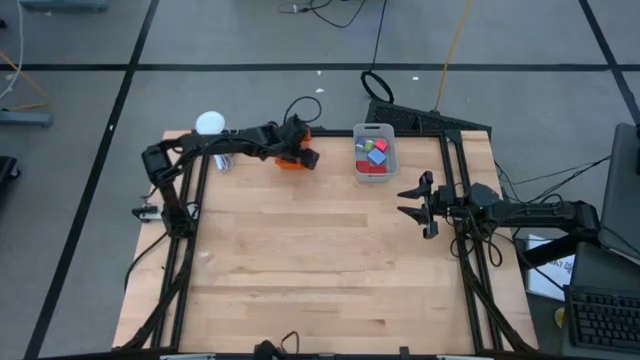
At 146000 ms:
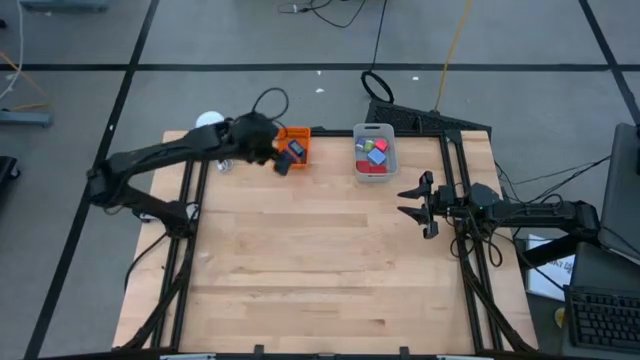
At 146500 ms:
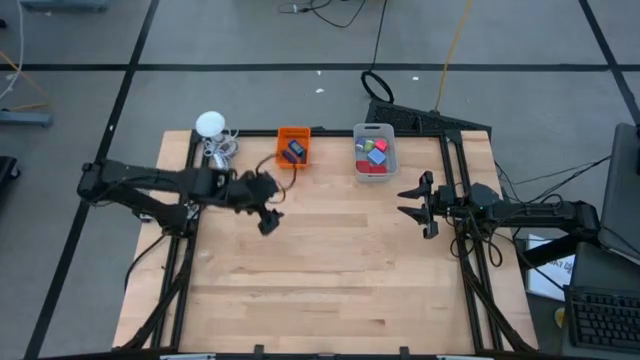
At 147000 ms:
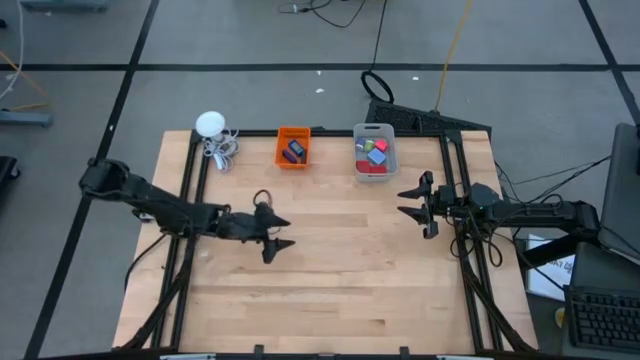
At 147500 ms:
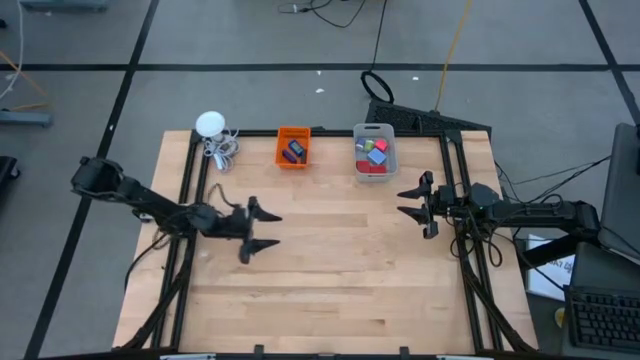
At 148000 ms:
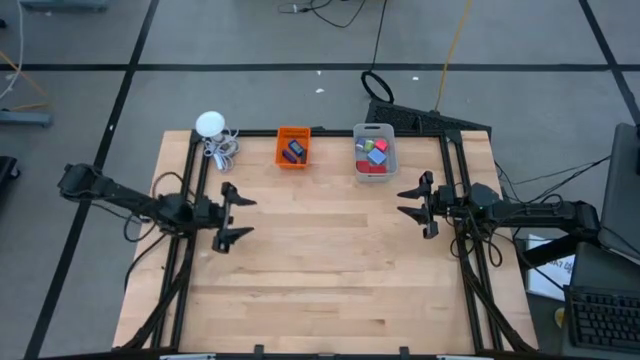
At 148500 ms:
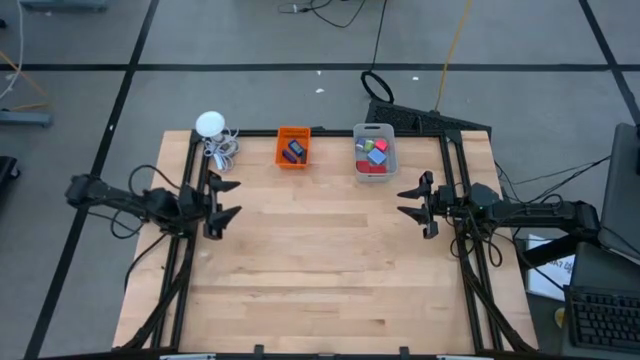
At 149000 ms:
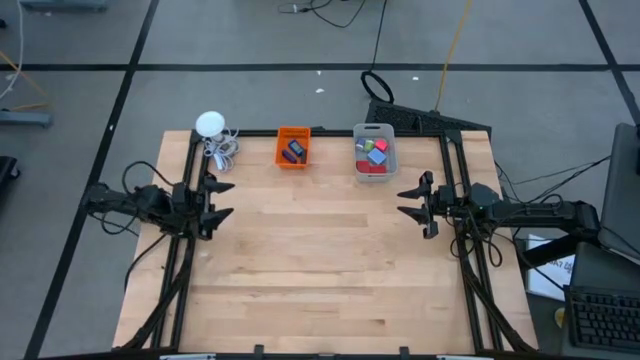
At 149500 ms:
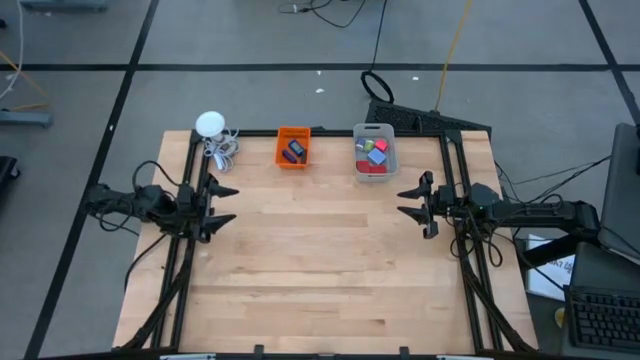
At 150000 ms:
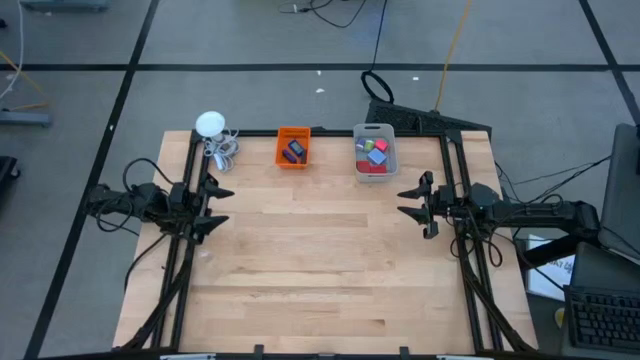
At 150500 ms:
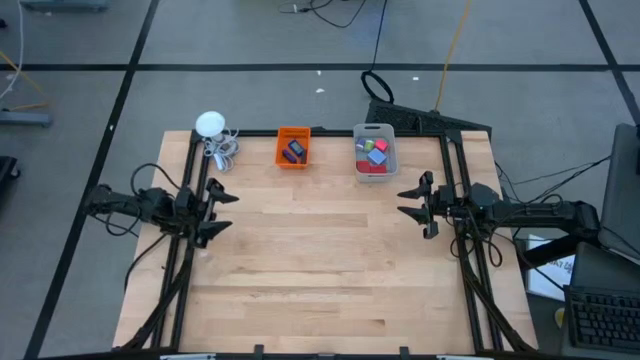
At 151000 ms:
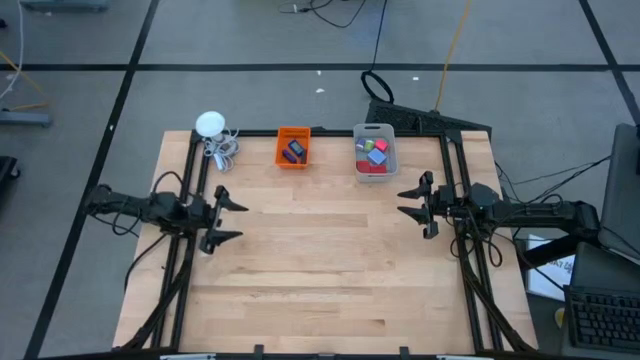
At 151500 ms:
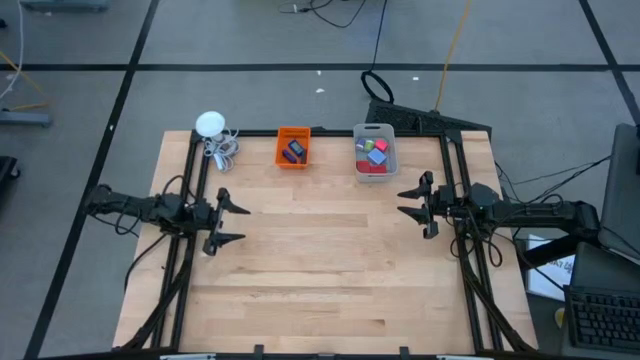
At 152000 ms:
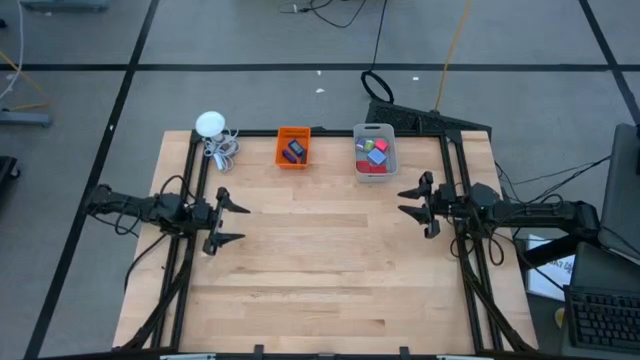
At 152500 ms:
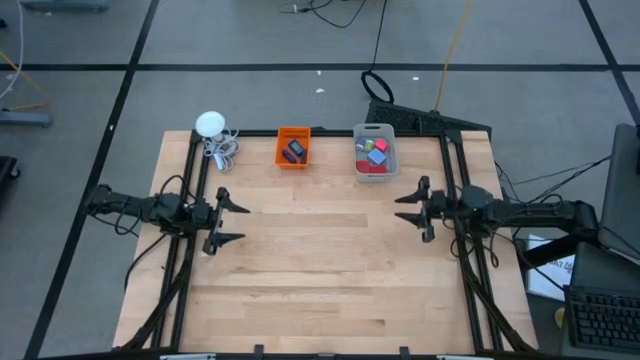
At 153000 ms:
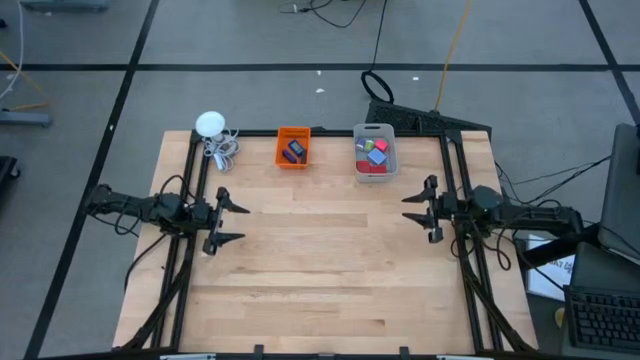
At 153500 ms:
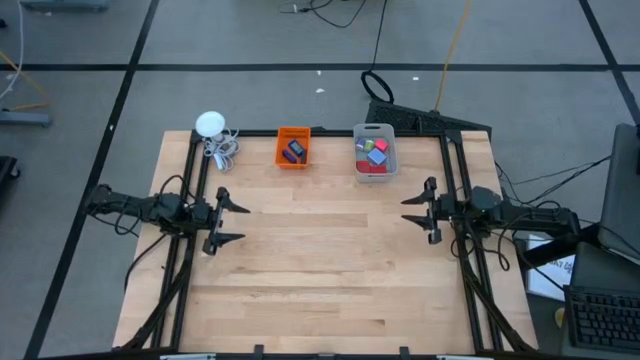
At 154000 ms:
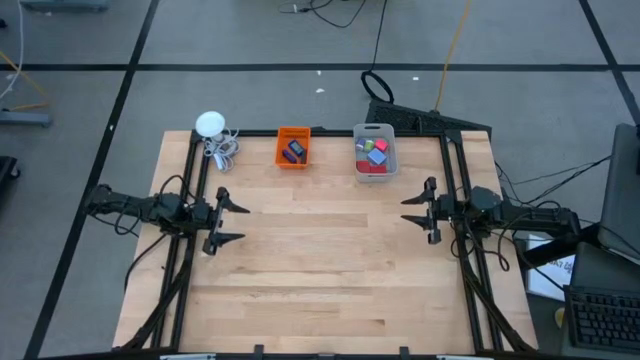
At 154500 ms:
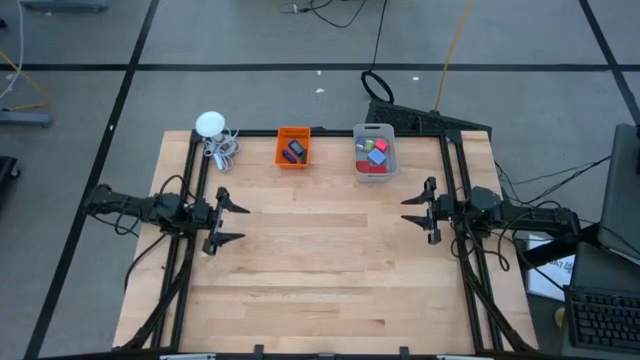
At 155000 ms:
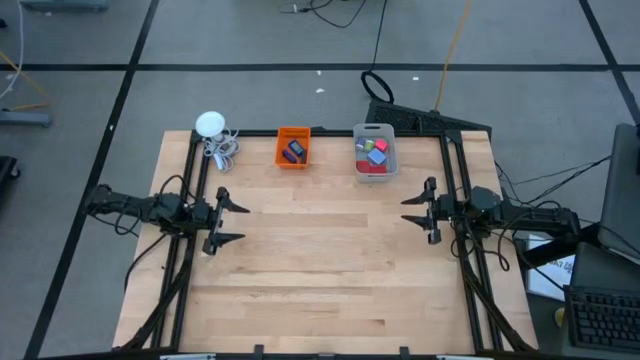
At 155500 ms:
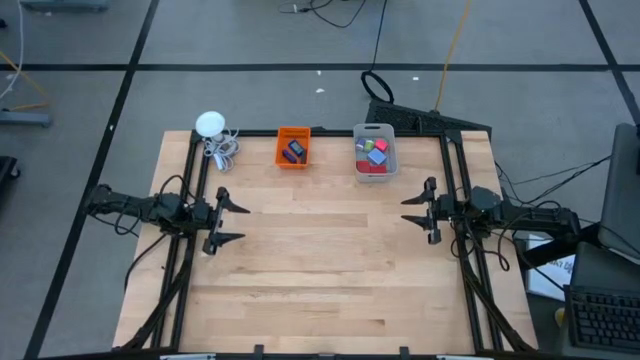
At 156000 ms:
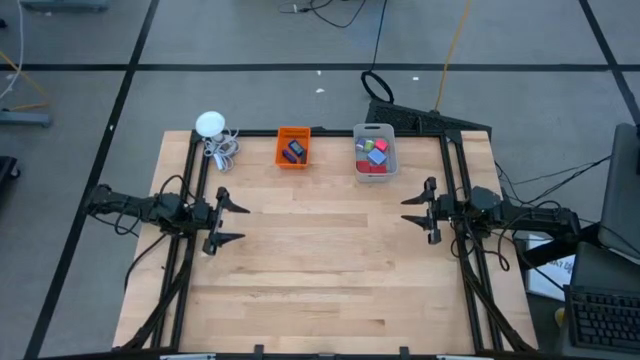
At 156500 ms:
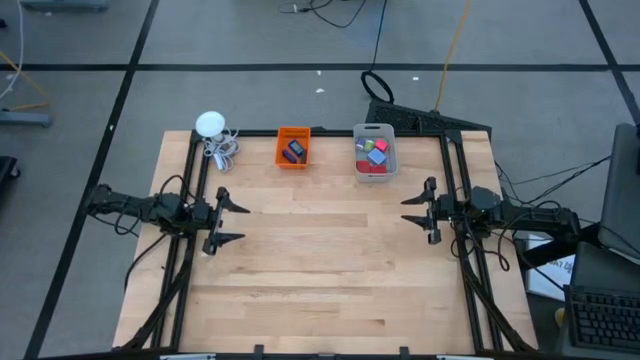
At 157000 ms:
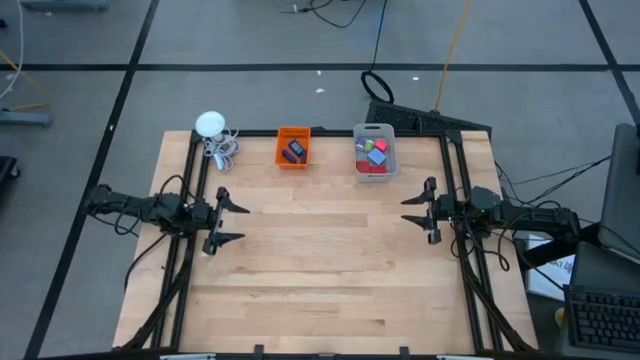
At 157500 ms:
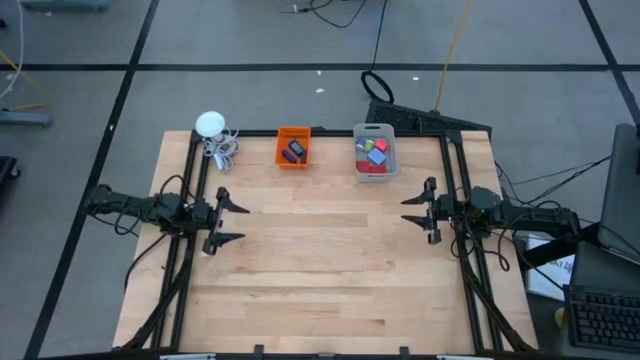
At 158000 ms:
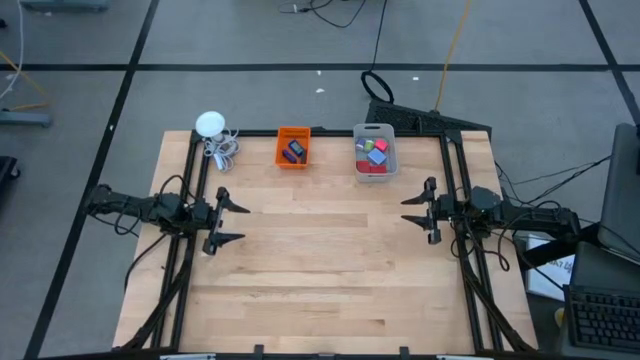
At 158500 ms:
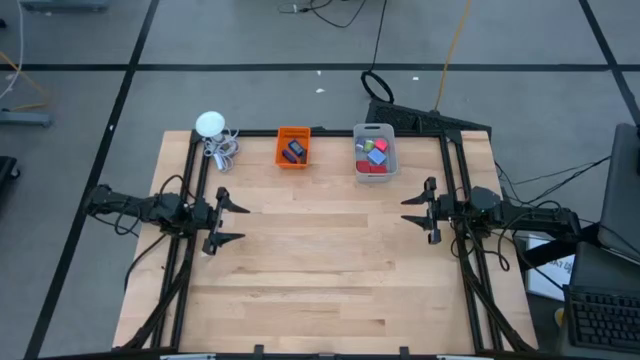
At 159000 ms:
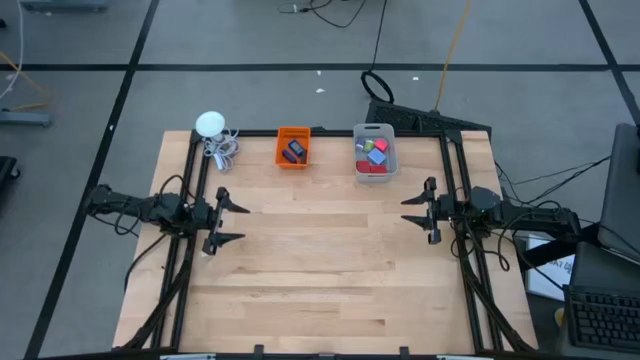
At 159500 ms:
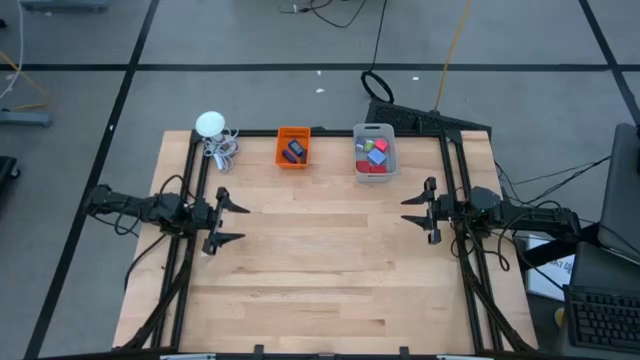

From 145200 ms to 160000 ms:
Task: Pick & Place Office items
Return to Home Position

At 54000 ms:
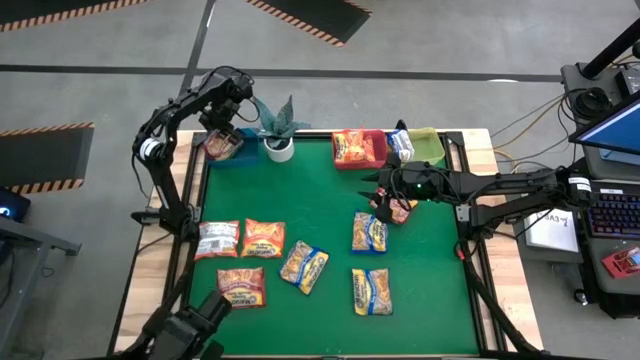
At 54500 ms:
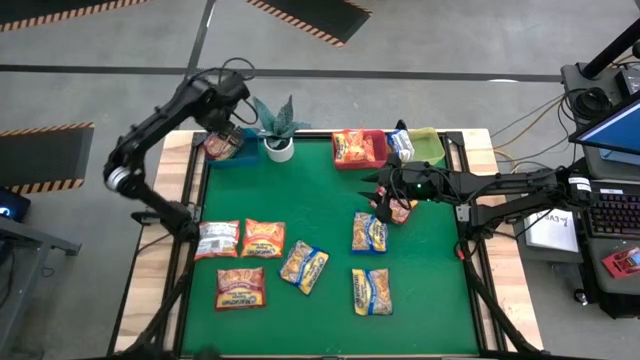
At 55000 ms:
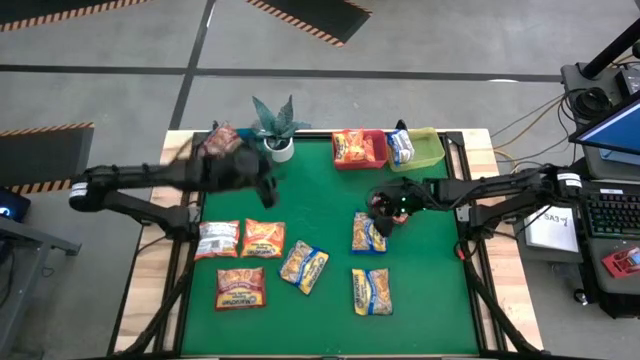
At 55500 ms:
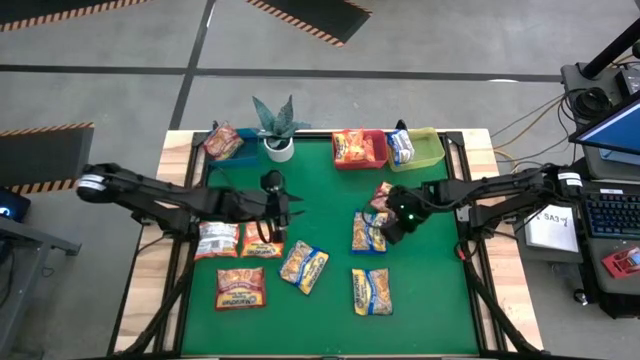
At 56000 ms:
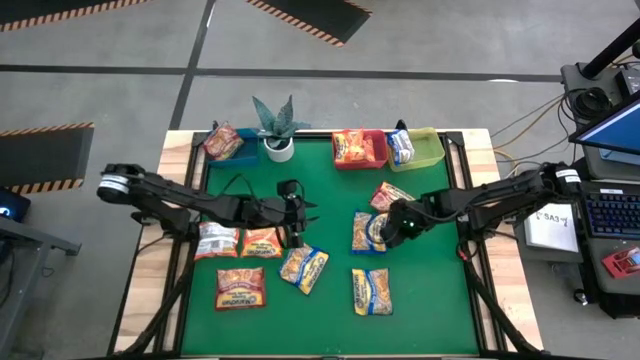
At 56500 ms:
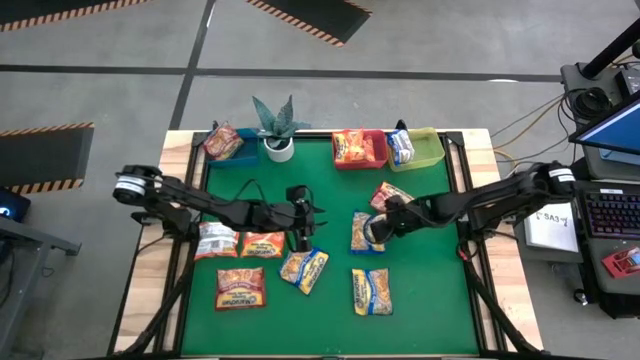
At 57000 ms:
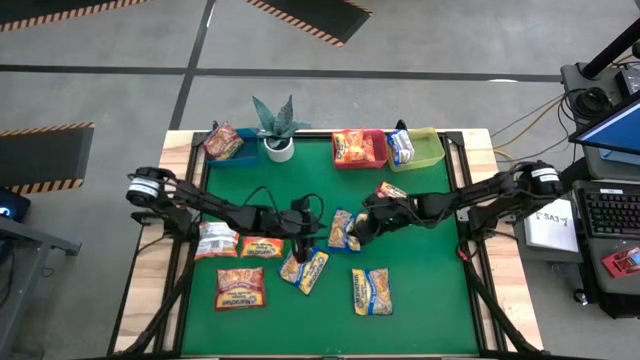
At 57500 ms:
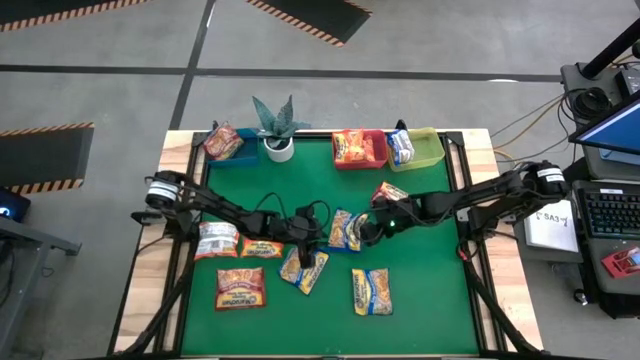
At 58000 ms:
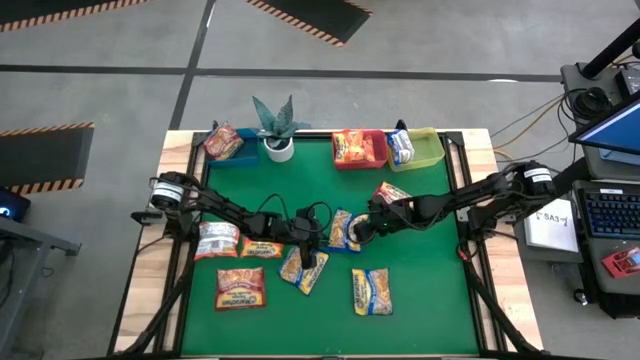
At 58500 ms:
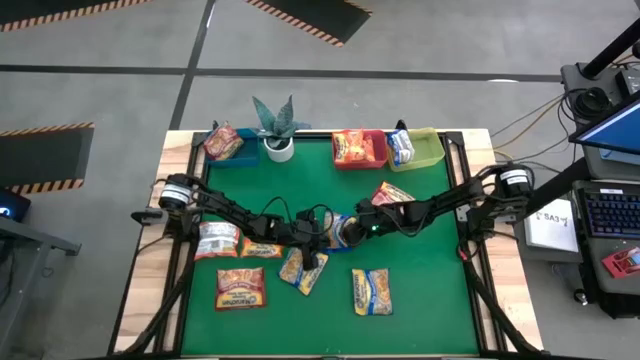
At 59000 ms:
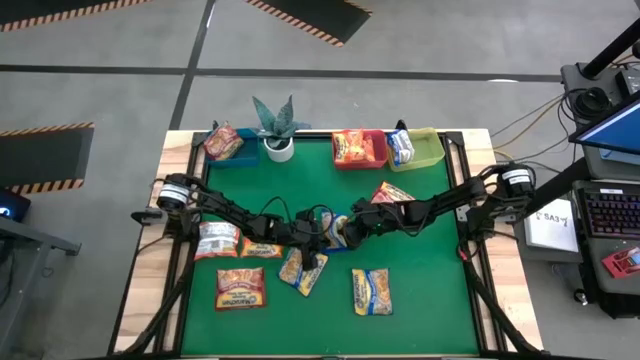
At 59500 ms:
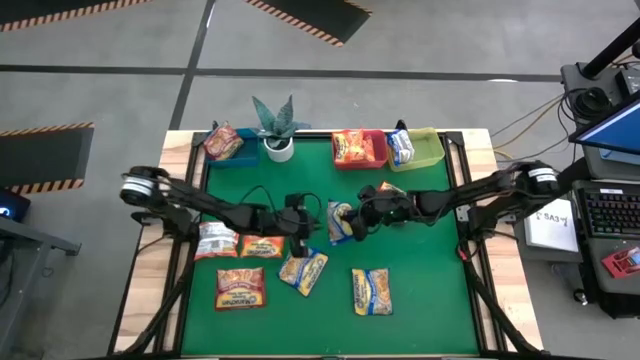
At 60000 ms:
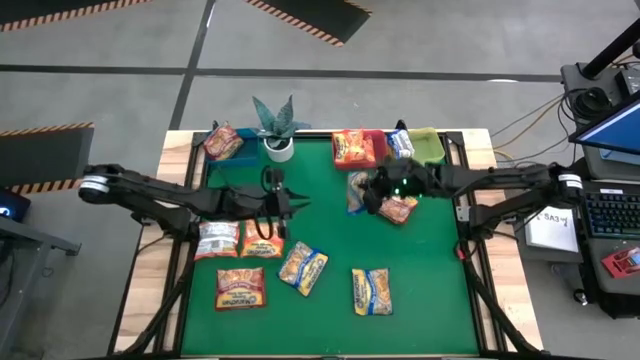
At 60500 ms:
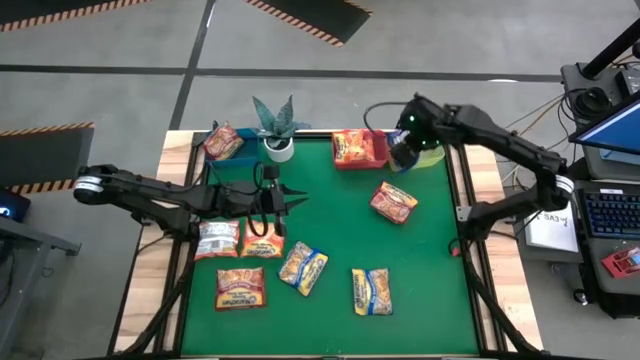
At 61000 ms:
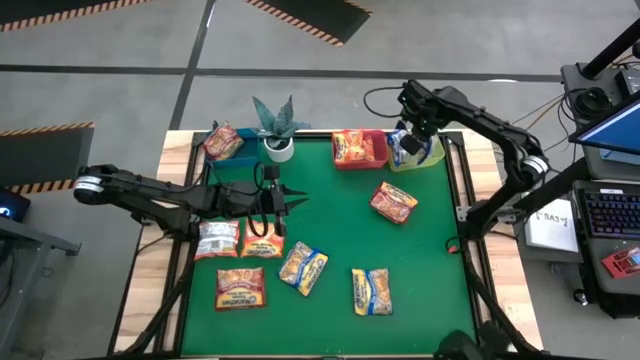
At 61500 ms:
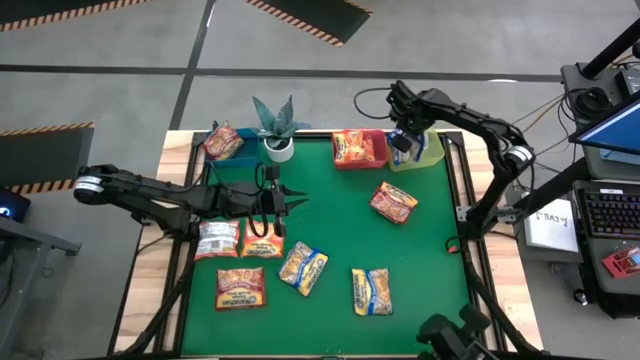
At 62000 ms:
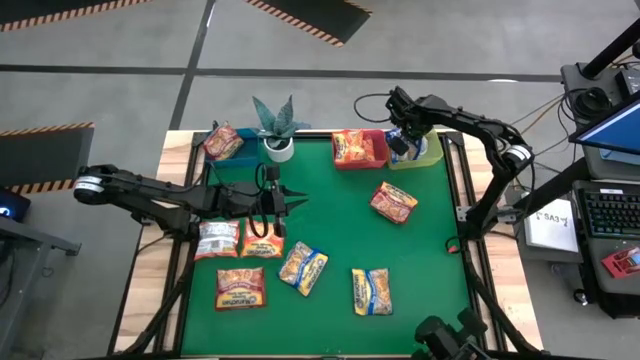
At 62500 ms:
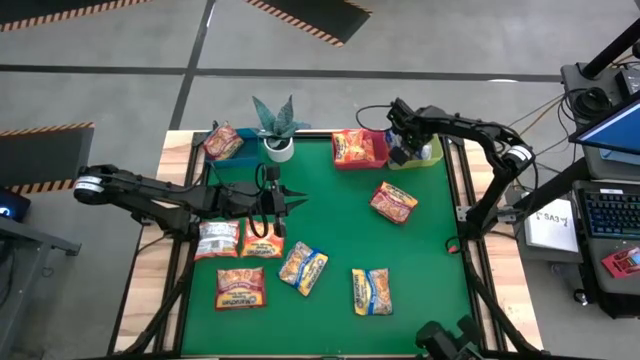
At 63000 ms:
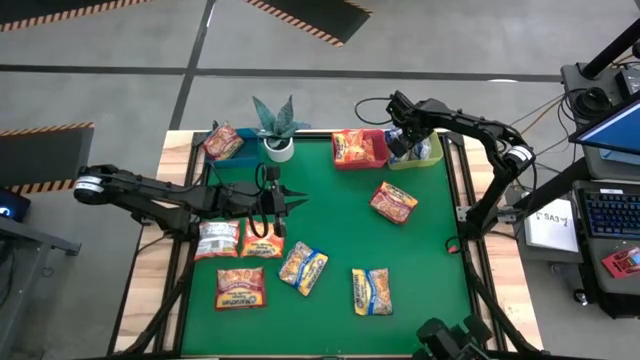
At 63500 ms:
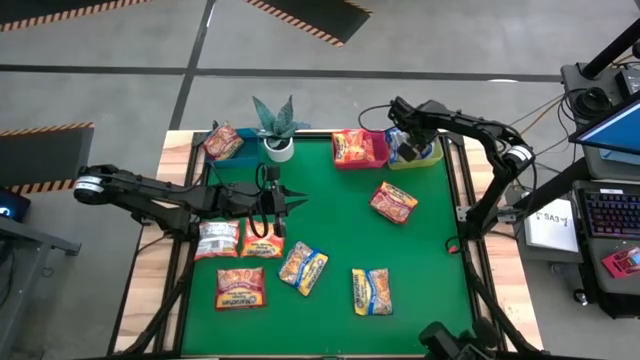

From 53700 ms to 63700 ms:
Task: Sort Maruchan noodles
Put the blue noodle pack into the yellow bin
